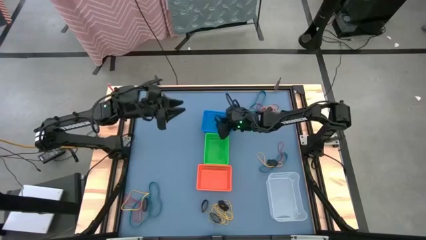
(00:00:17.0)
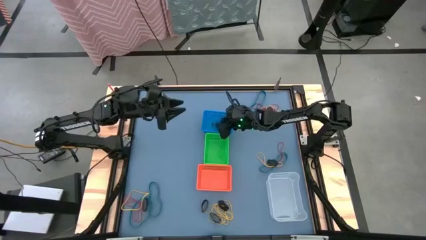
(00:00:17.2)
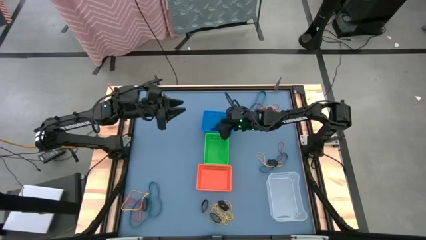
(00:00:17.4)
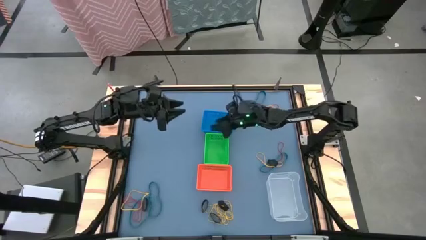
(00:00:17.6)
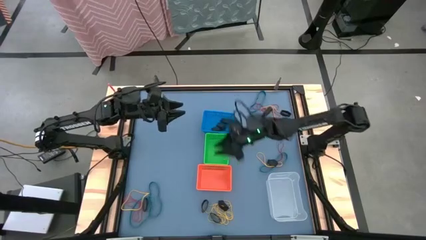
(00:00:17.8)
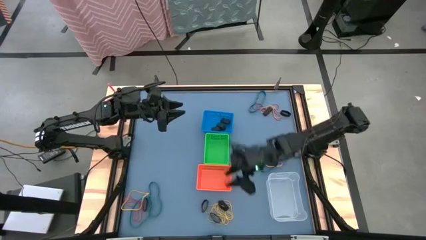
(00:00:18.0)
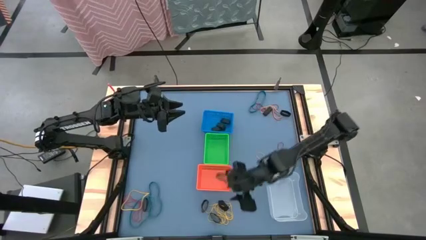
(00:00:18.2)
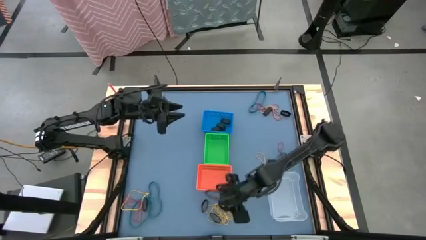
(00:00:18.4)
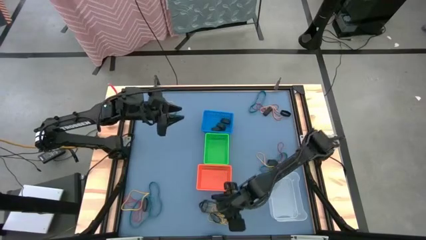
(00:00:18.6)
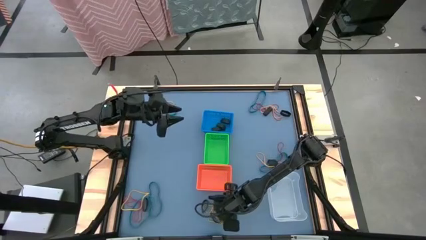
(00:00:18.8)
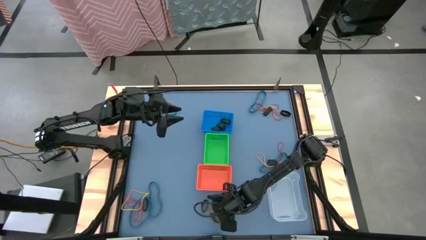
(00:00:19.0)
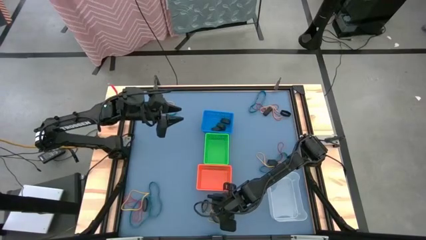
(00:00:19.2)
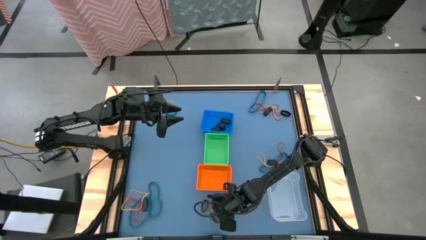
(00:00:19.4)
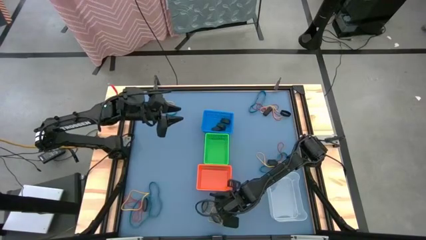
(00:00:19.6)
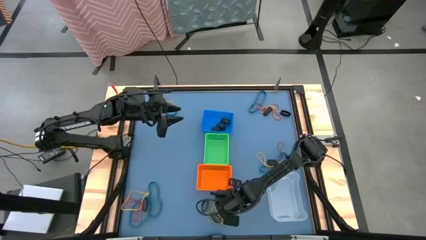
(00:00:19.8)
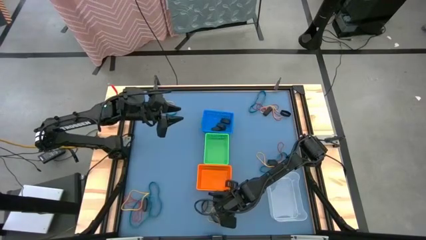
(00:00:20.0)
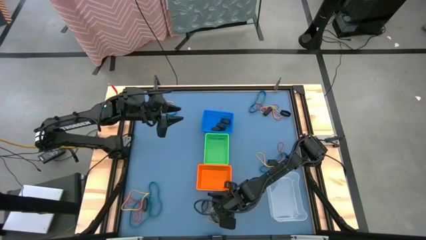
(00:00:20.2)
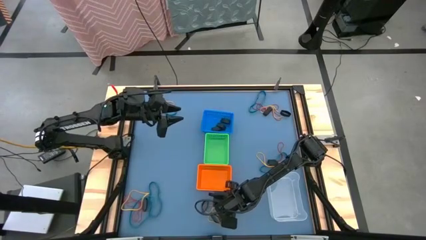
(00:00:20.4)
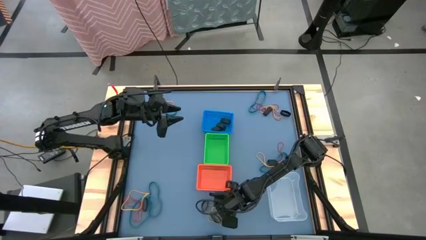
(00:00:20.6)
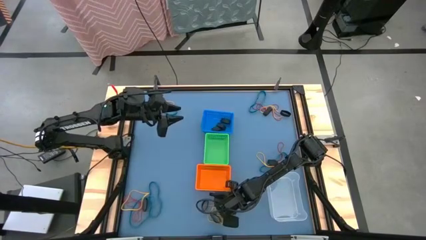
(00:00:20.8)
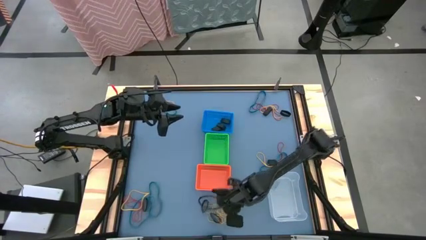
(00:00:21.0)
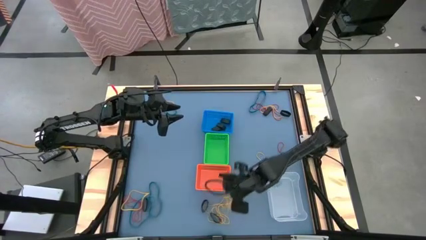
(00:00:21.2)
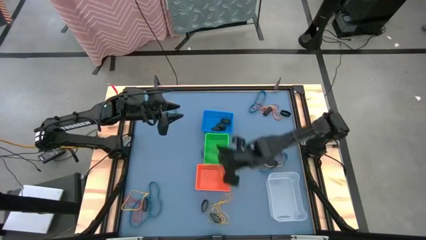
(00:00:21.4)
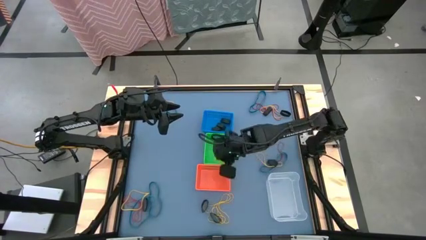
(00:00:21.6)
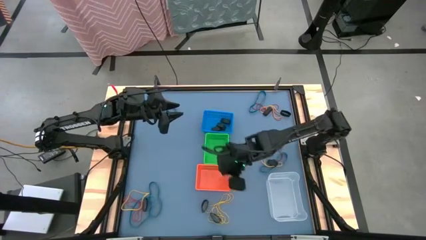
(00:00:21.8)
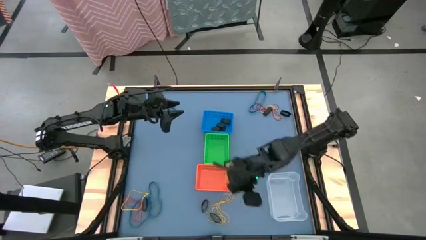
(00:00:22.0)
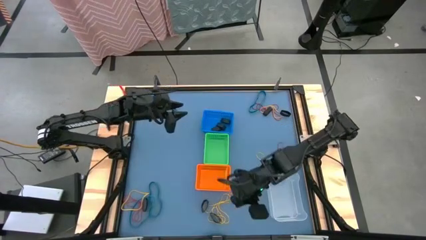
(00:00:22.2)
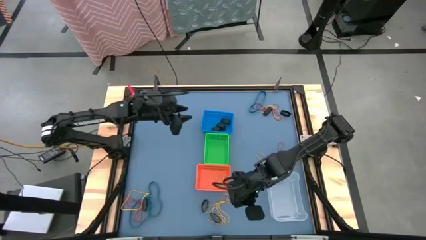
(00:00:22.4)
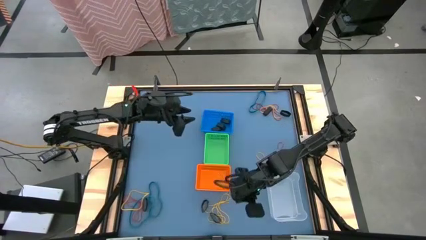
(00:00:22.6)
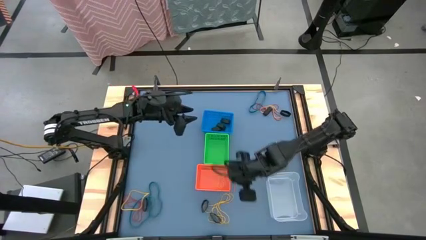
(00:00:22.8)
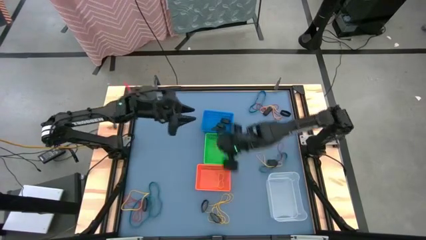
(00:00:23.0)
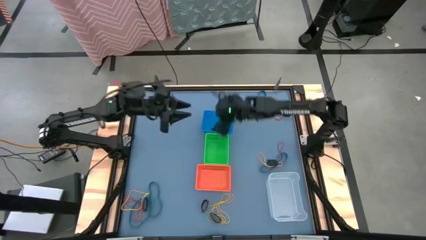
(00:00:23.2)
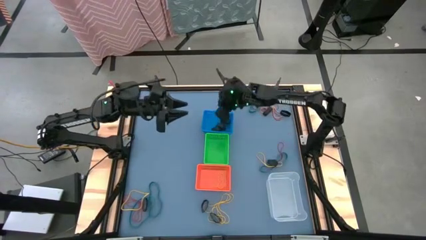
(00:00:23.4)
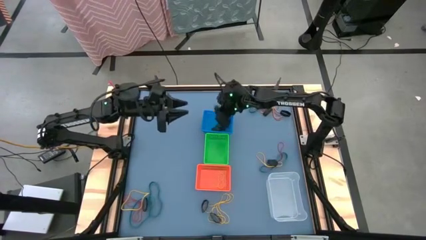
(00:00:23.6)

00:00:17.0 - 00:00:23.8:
Task: Sort rubber bands into baskets
Put the black rubber band into the blue bin

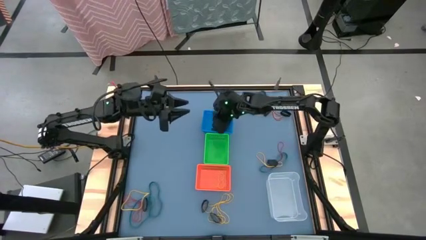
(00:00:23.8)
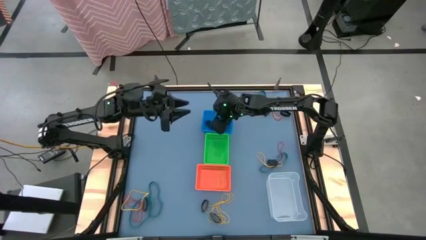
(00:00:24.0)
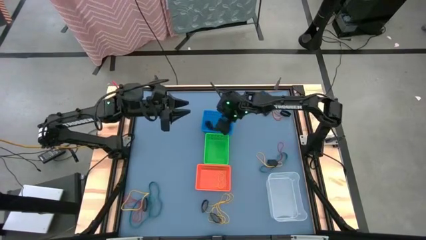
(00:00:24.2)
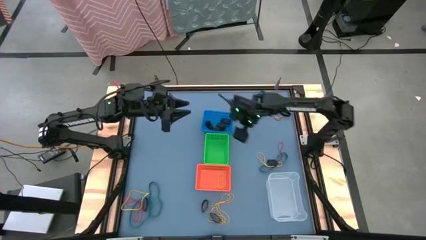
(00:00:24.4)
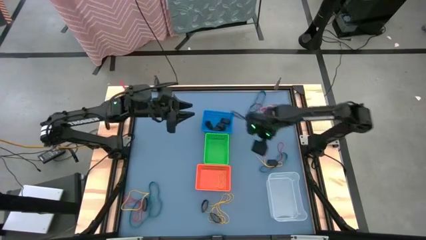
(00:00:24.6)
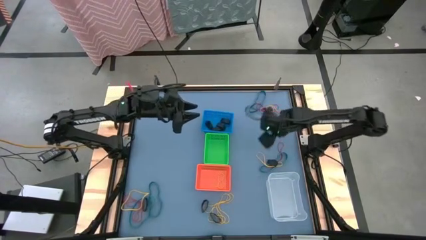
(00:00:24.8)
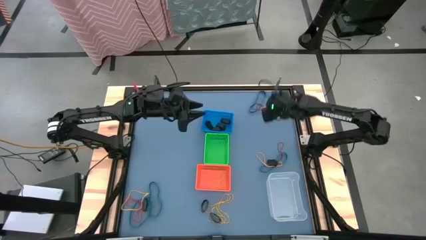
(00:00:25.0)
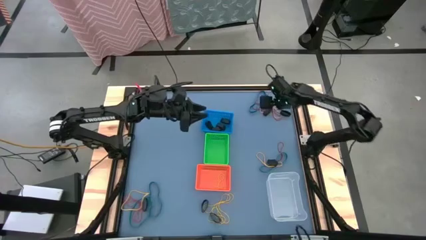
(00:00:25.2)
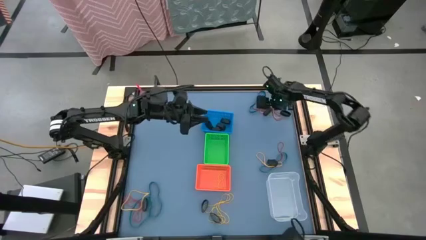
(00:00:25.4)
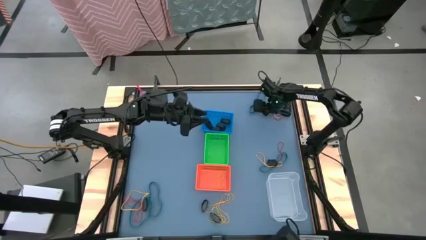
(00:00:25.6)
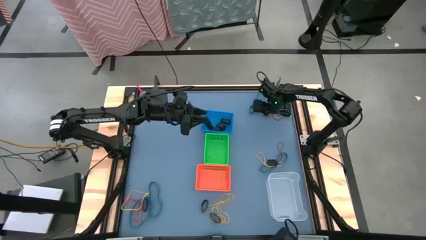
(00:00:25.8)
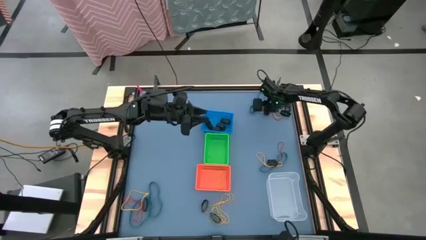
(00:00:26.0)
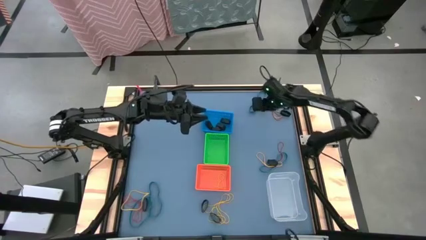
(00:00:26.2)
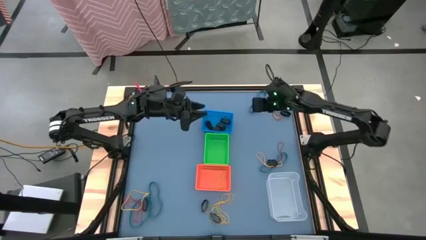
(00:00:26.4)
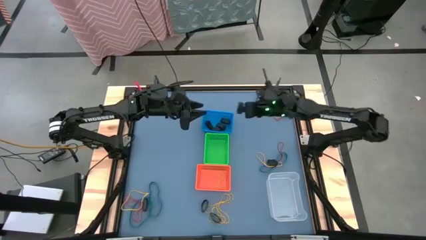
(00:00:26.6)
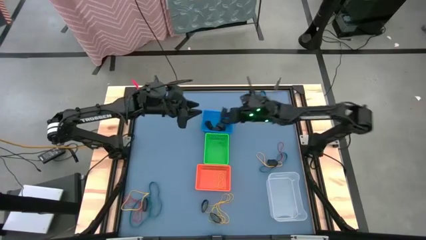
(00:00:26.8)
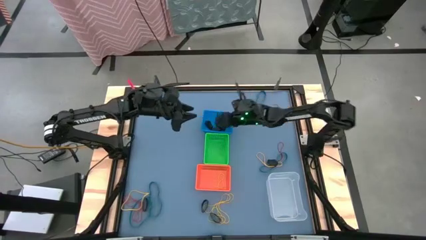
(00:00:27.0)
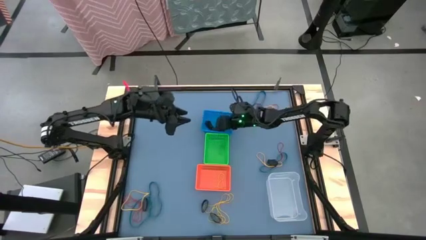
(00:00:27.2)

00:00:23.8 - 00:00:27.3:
Put the black rubber band into the blue bin

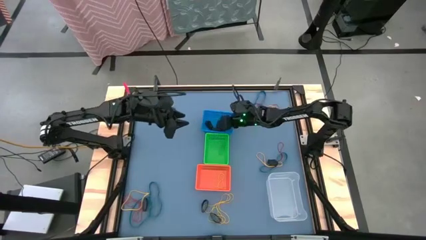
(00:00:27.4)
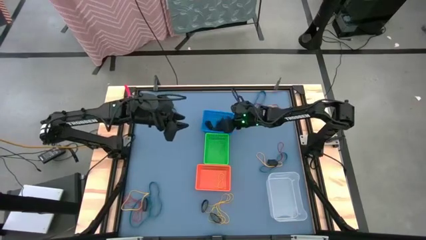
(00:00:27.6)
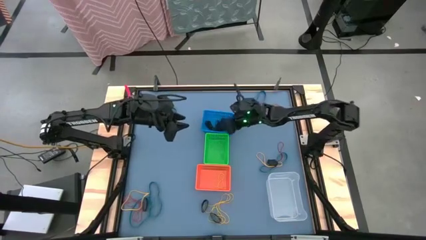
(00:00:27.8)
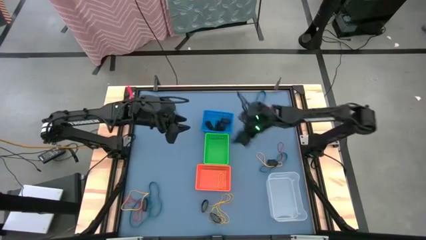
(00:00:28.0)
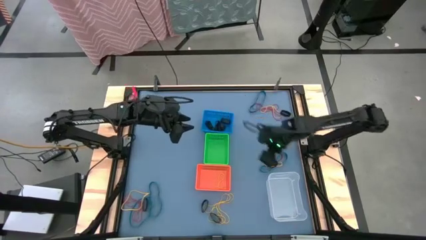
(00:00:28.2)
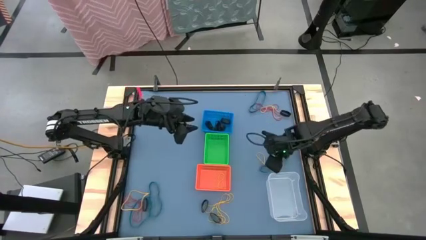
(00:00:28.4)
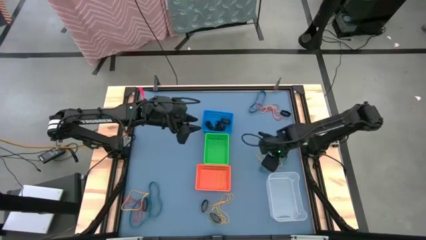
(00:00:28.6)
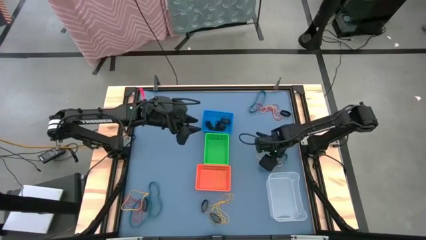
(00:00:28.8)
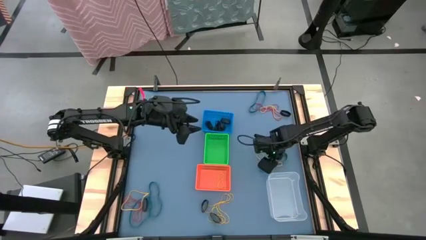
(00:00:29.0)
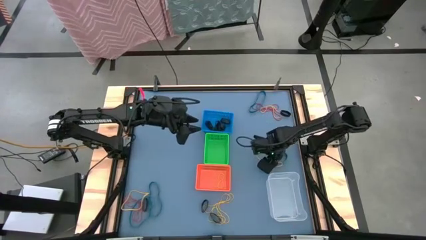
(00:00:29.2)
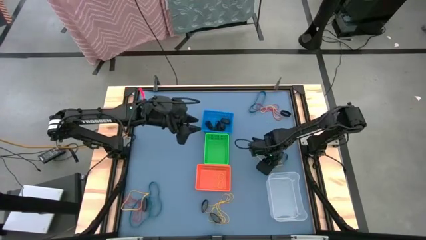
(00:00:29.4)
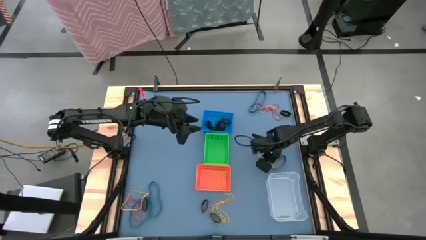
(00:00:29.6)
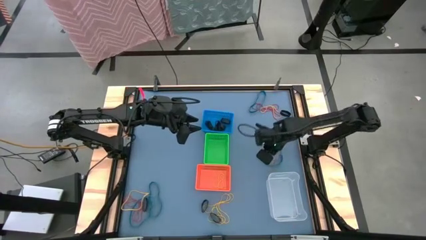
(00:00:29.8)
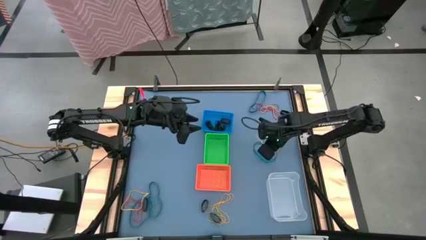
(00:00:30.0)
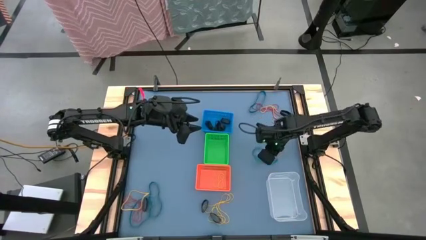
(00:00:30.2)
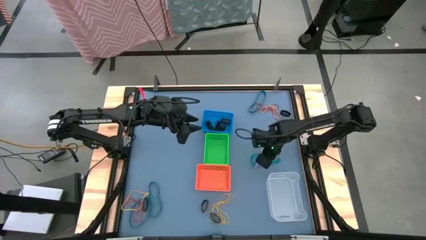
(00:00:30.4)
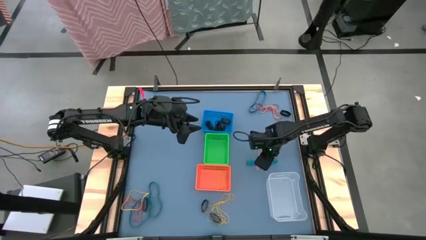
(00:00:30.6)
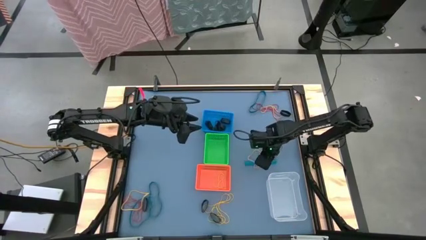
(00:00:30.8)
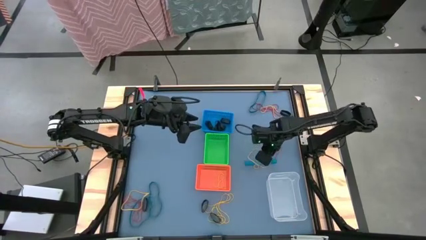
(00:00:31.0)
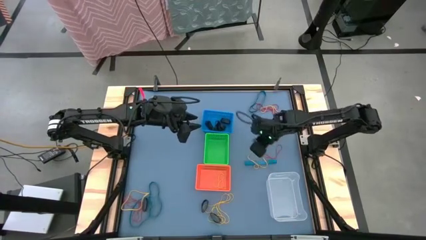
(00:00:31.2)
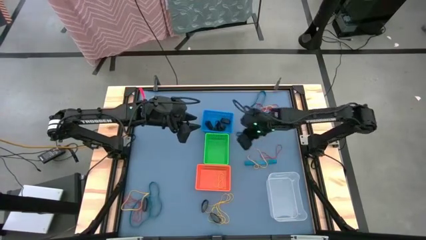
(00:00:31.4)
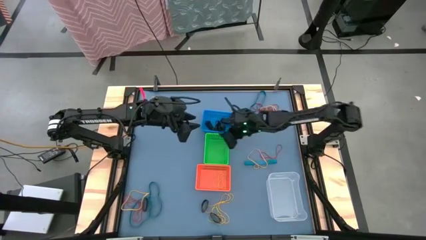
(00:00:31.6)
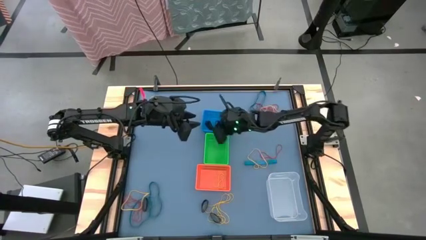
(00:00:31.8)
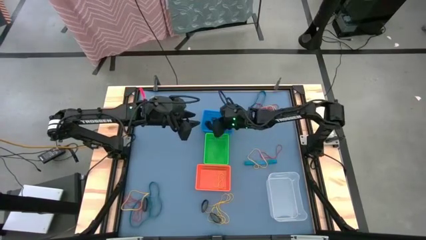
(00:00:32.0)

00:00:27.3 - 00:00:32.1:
Put the black rubber band into the blue bin

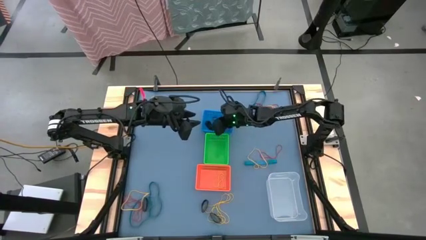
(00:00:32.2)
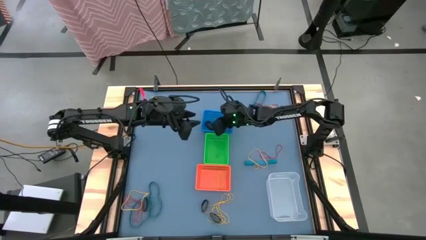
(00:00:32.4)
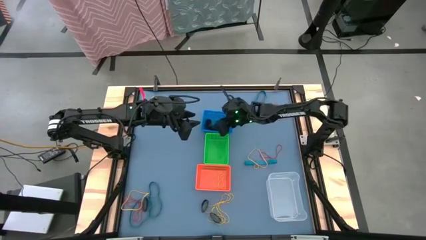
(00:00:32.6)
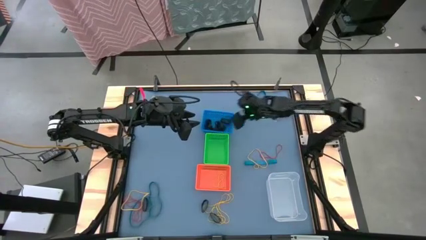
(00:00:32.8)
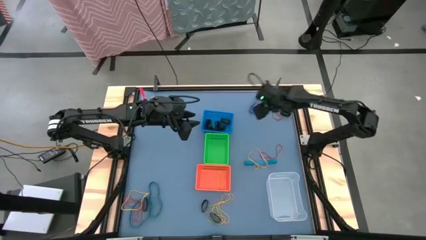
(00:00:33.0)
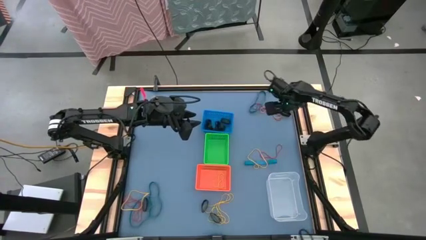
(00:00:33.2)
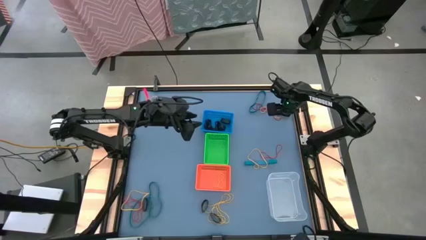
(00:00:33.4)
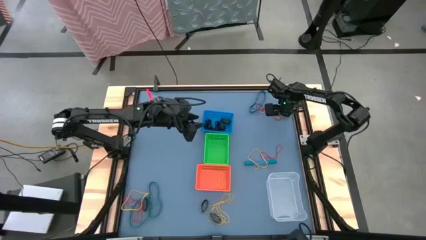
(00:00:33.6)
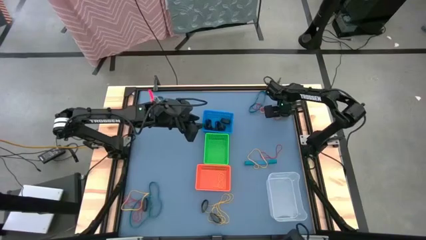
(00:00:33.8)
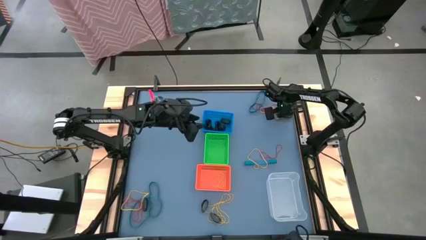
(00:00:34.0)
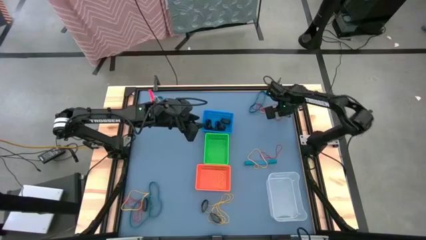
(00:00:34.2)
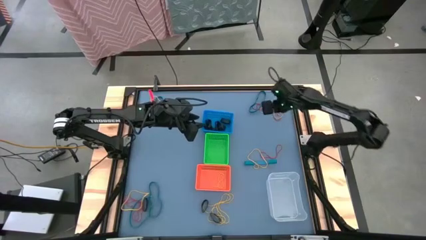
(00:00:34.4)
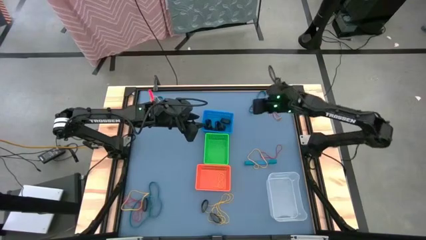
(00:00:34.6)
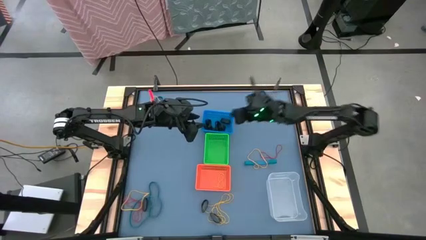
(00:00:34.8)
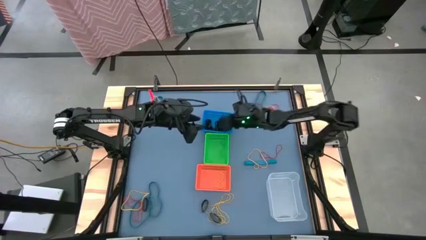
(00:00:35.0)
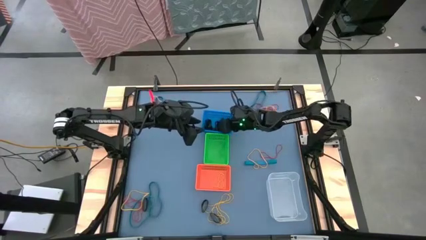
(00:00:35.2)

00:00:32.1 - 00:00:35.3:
Put the black rubber band into the blue bin
